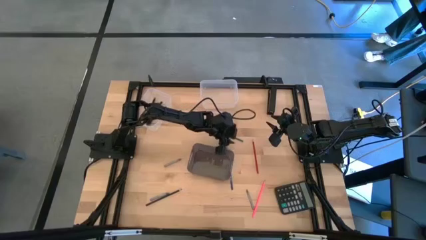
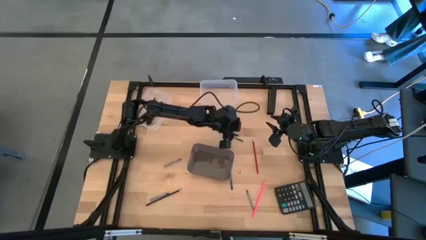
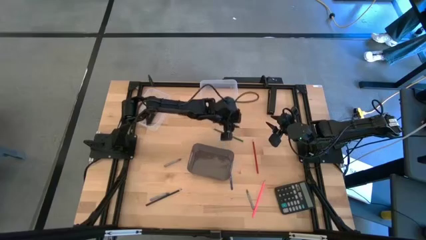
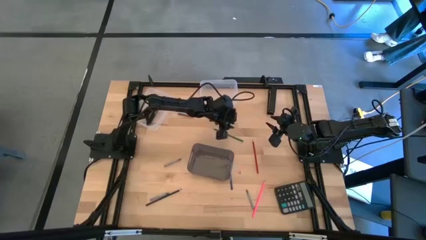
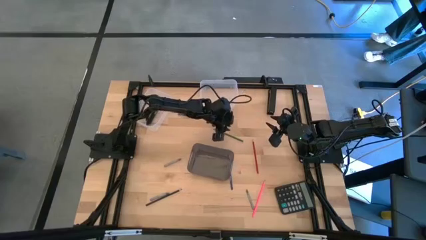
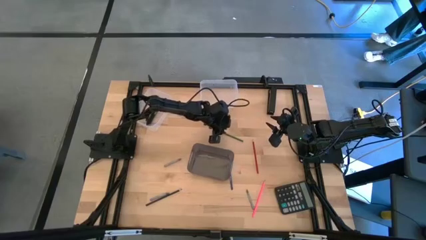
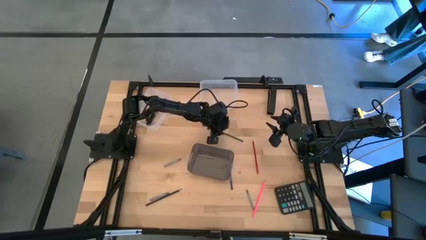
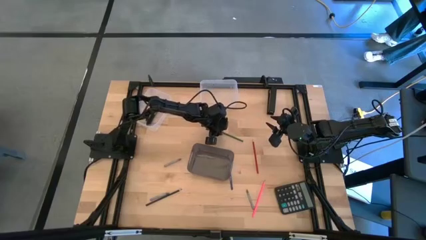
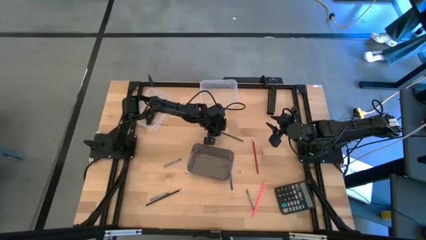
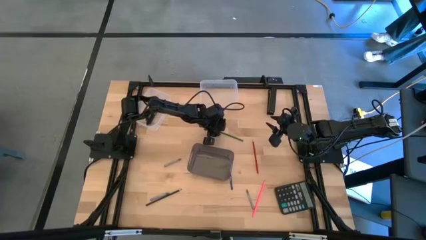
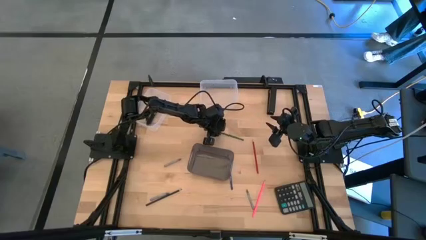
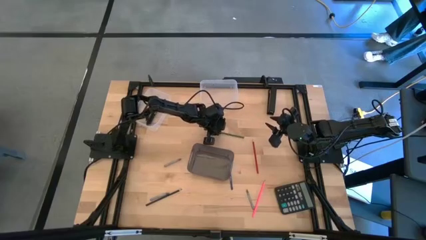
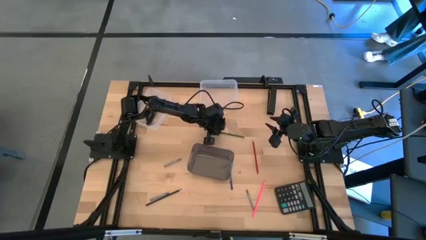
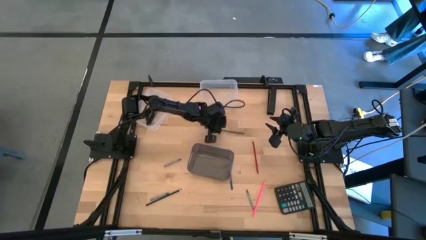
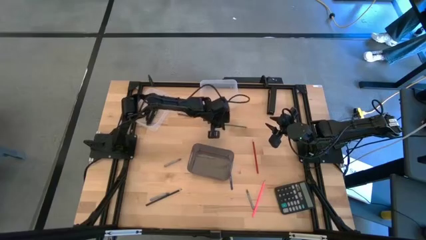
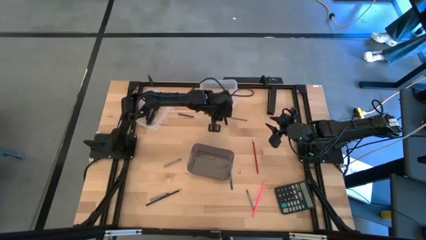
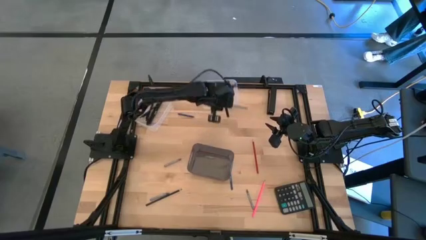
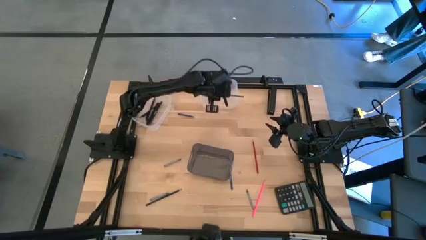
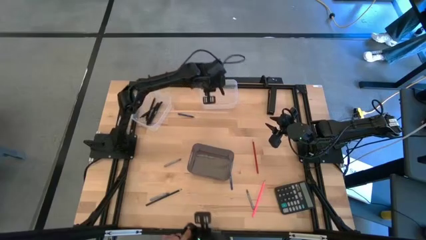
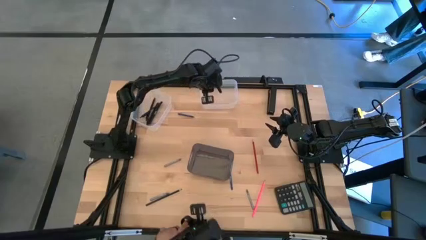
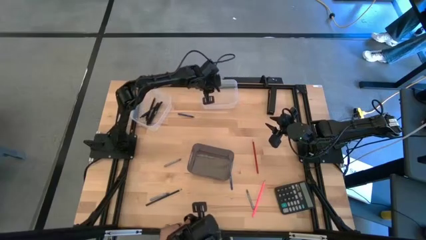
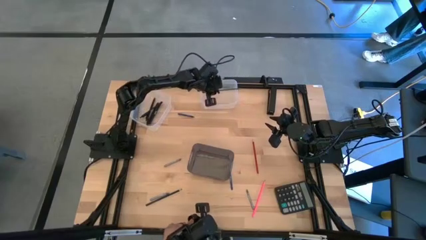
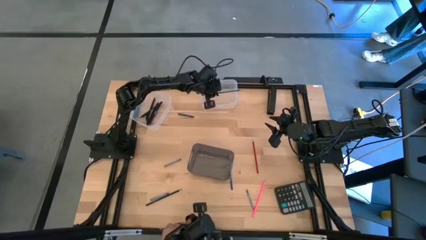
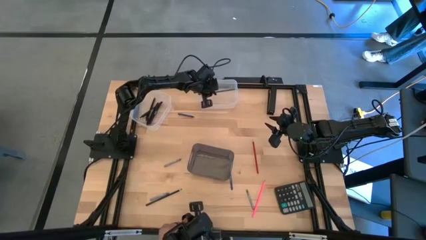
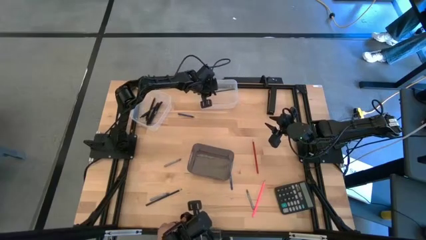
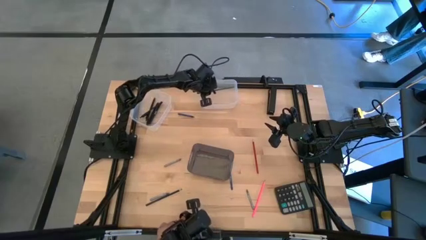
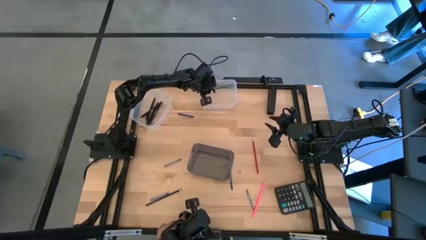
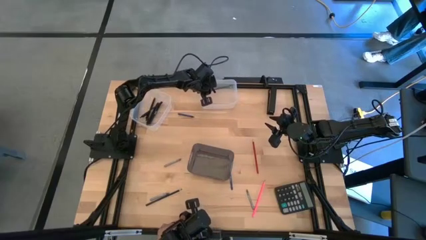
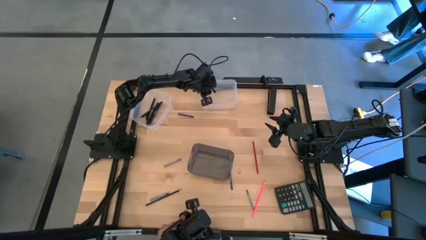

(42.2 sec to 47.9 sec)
Task: Sort crayons/erasers/pens/pencils in bins
Put the green pencil into the right transparent bin

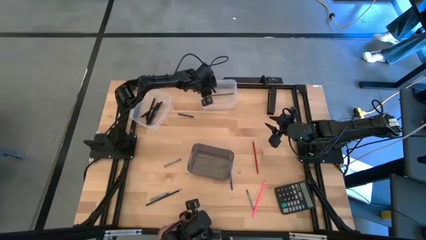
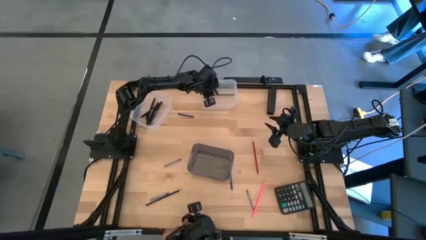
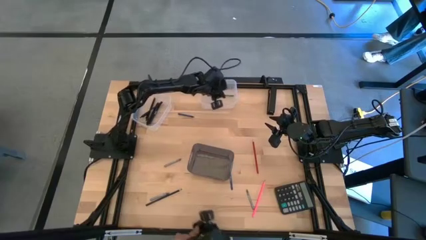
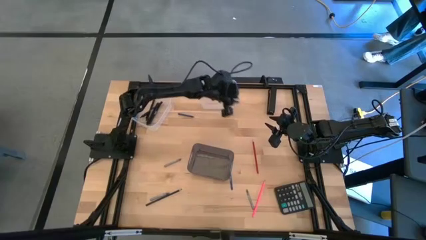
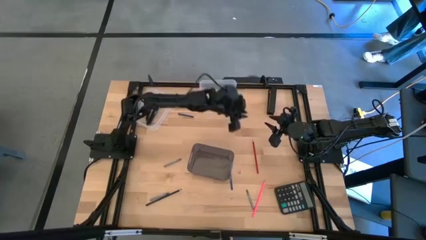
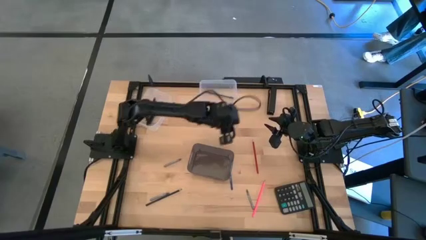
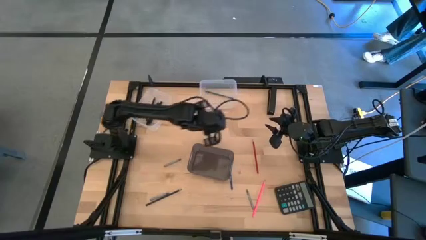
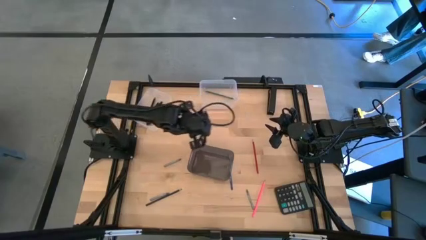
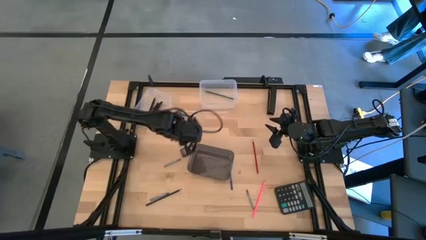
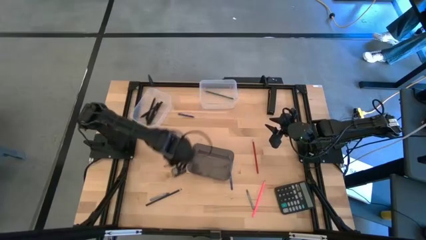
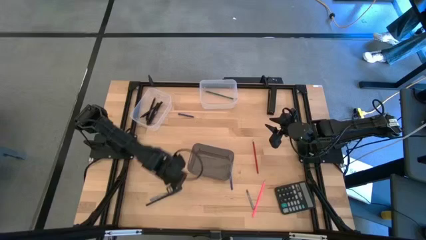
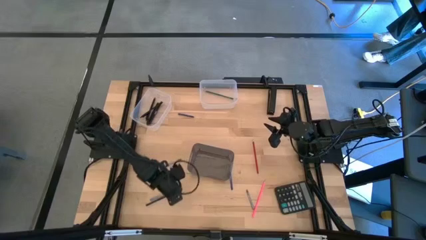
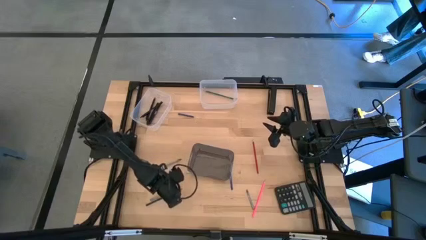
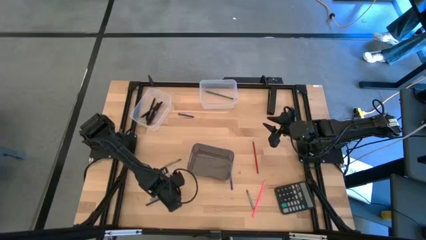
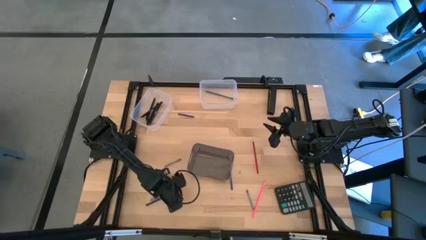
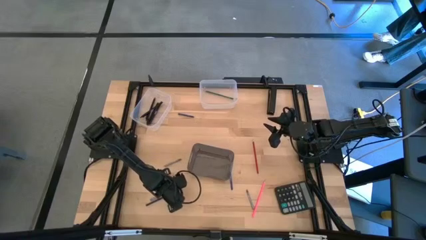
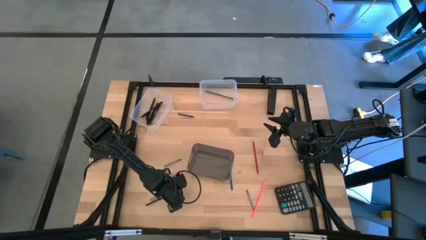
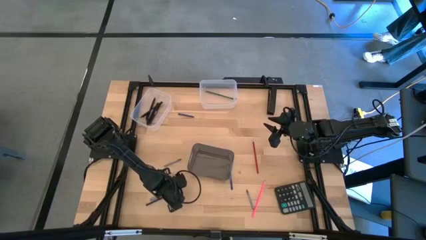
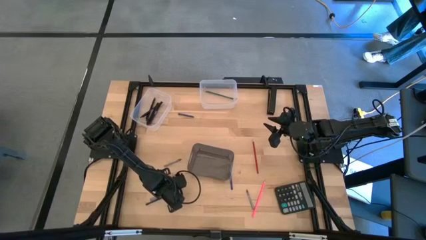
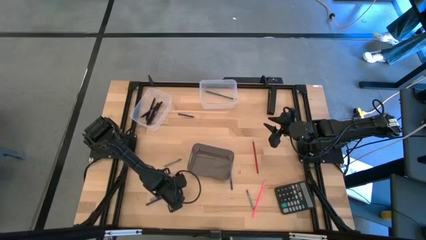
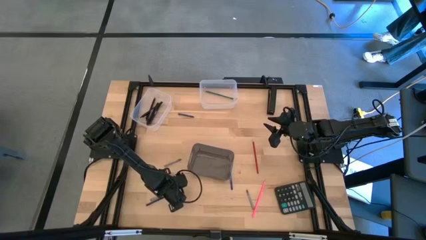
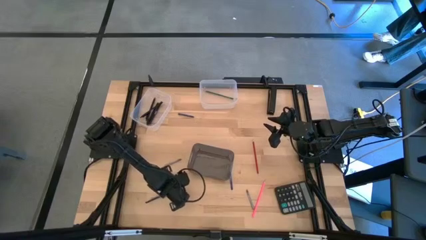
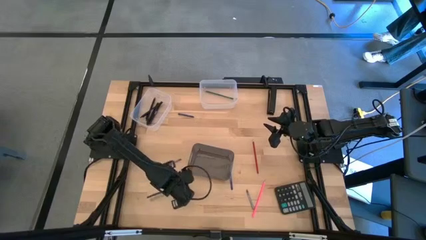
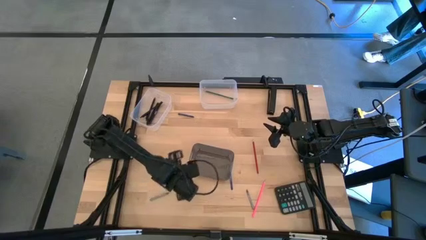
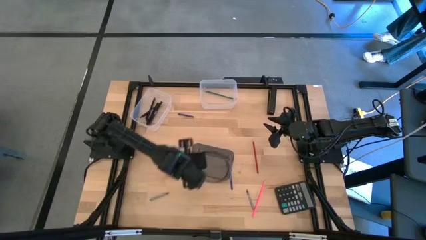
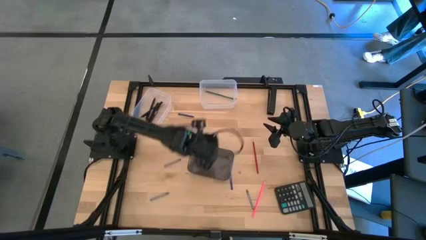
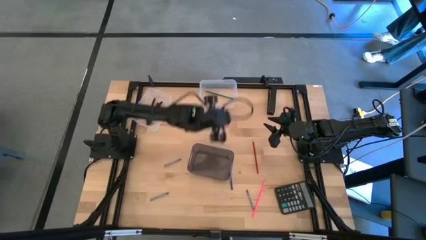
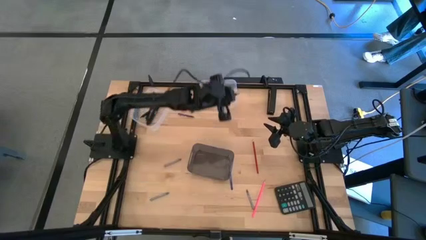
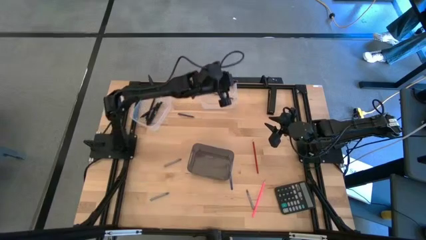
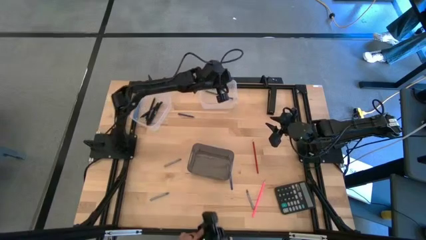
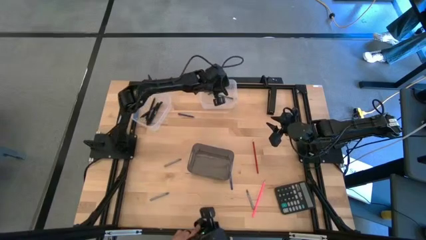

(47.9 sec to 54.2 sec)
Put the dark blue pencil into the right transparent bin
